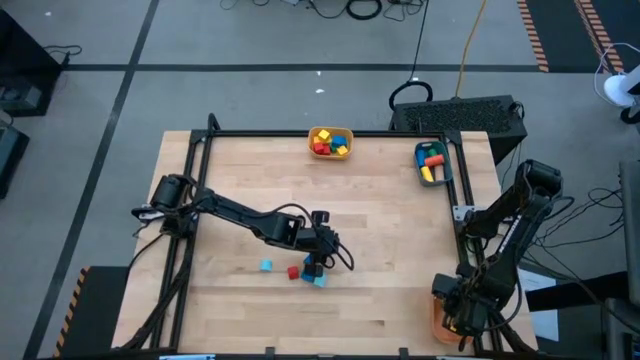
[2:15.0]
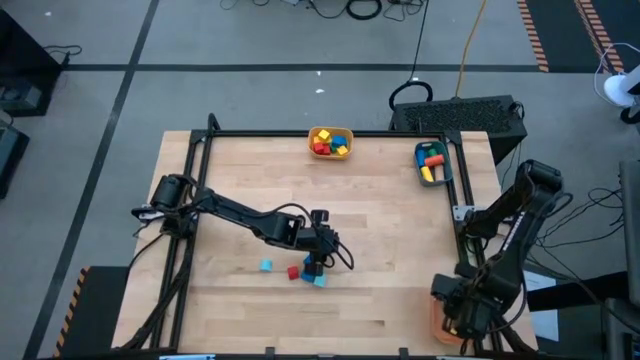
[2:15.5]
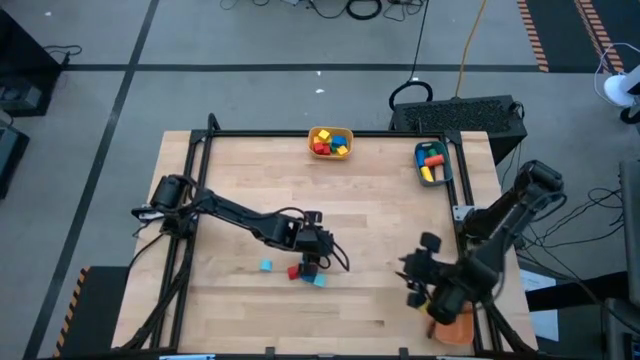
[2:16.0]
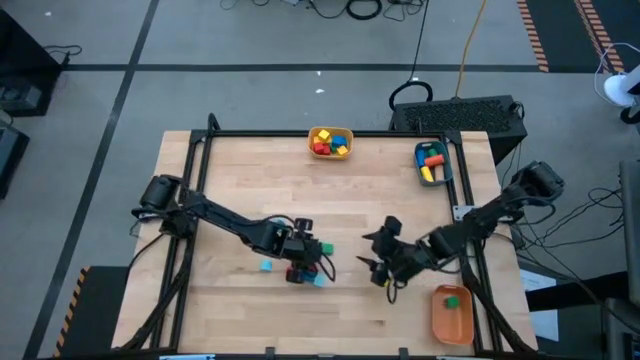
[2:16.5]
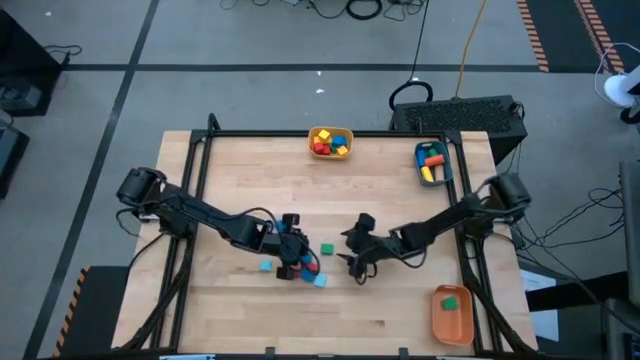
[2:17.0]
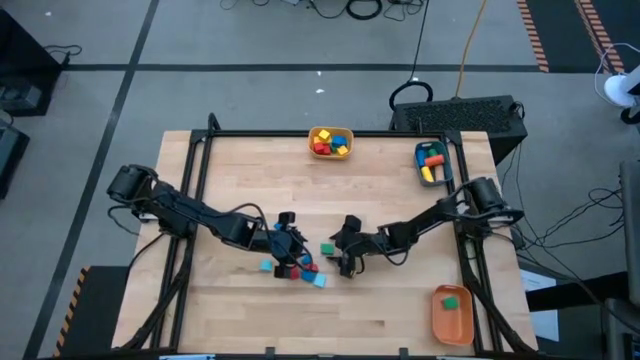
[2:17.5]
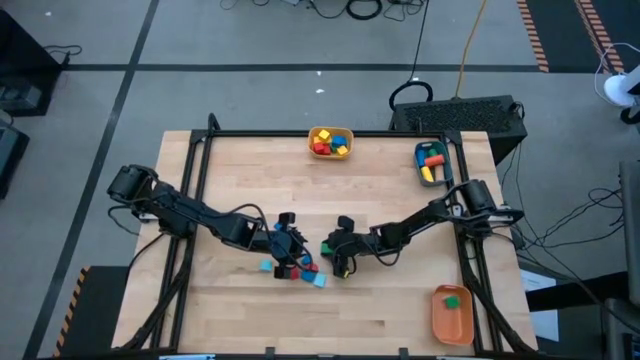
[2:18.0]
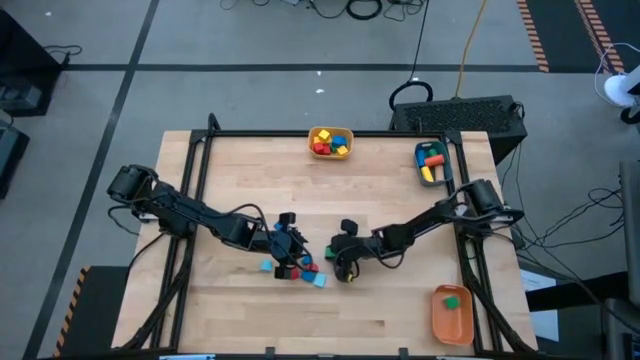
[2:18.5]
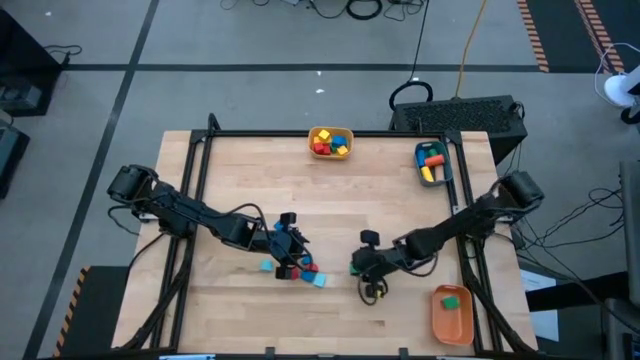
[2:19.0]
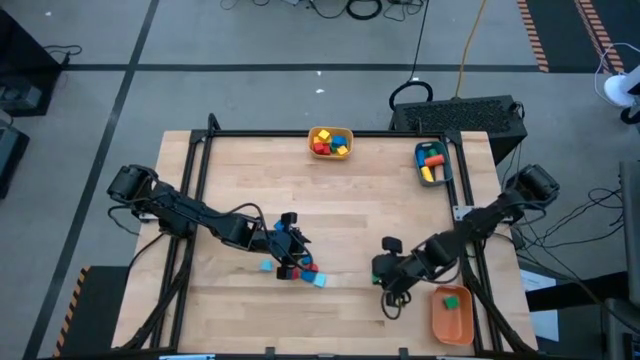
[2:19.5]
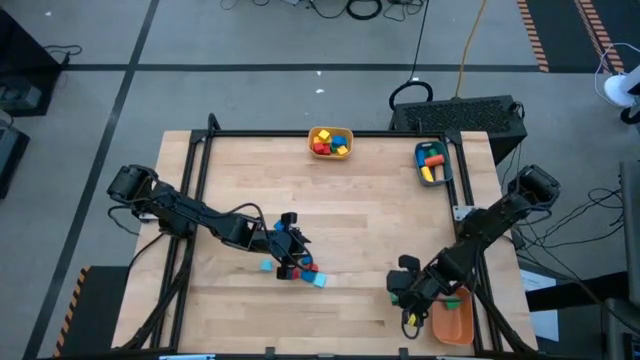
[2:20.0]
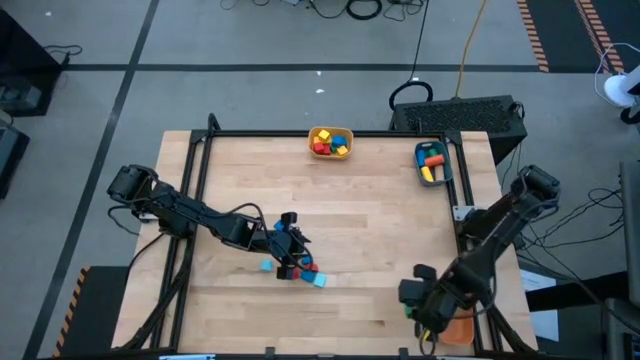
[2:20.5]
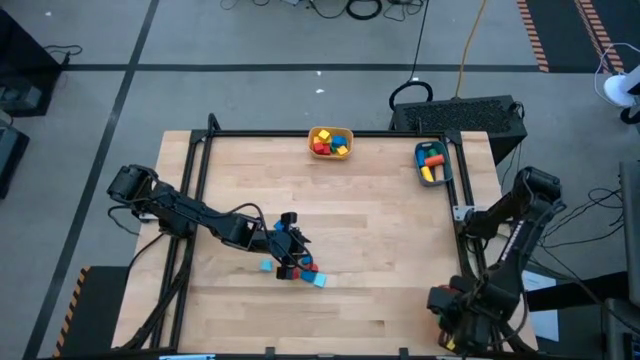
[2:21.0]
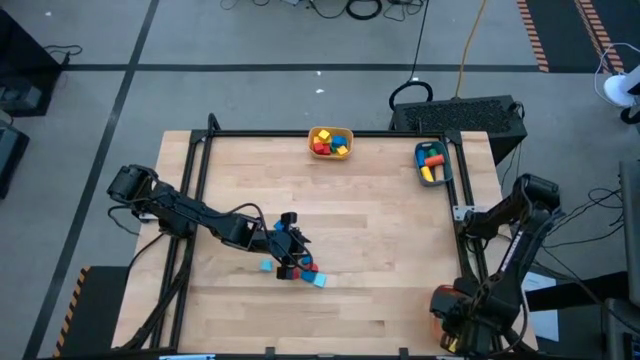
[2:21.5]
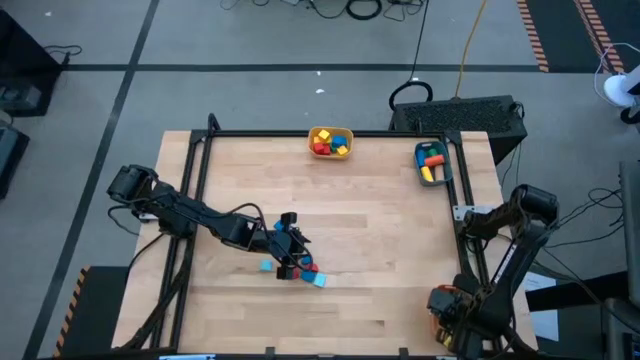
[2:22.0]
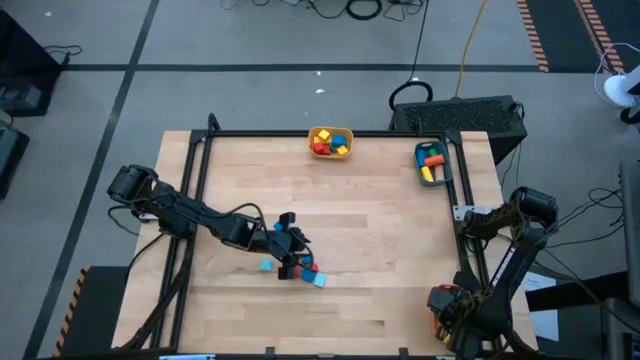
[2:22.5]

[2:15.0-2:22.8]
Task: Sort blocks by size
Put the green half circle block into the orange bin

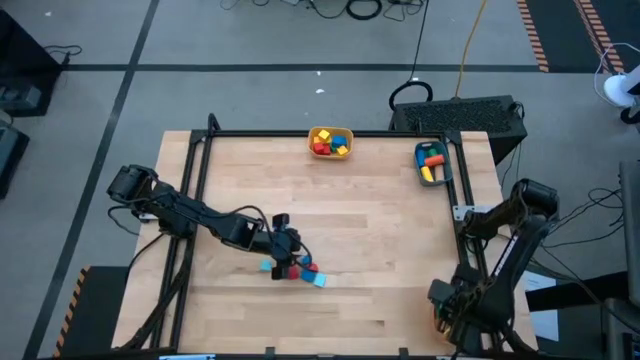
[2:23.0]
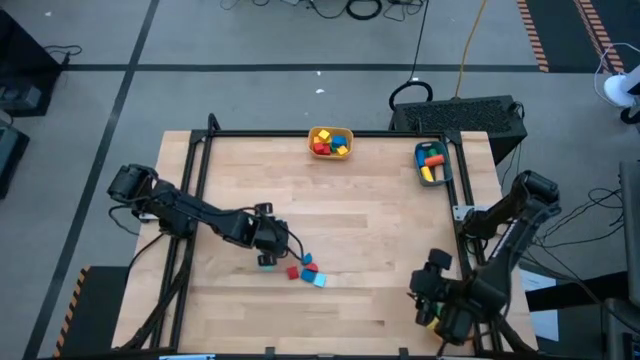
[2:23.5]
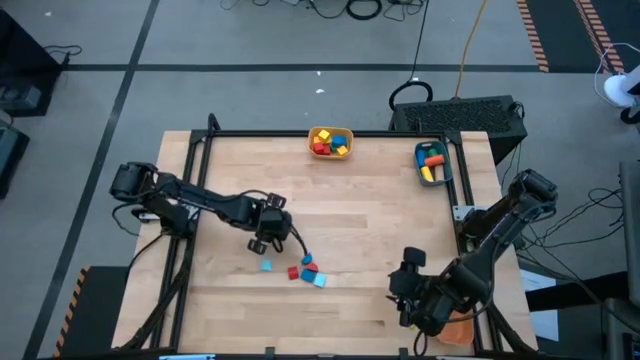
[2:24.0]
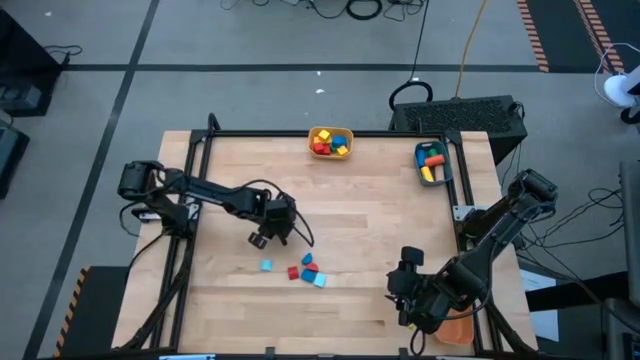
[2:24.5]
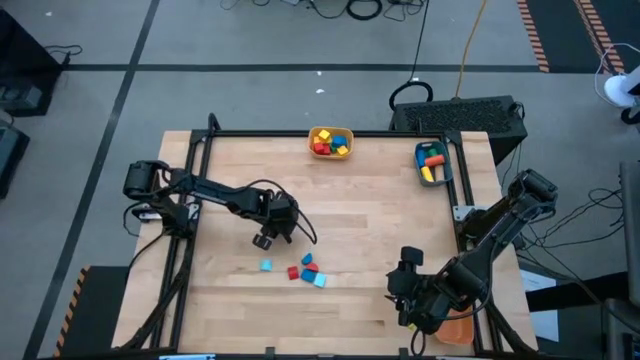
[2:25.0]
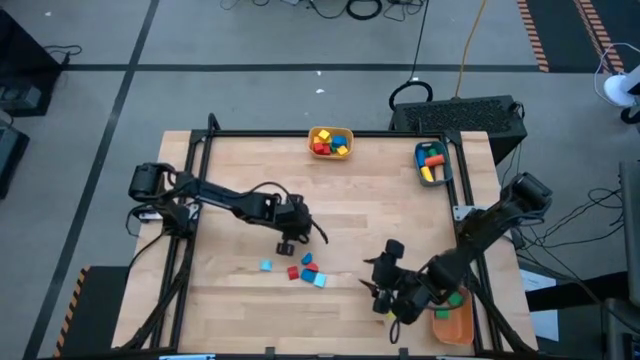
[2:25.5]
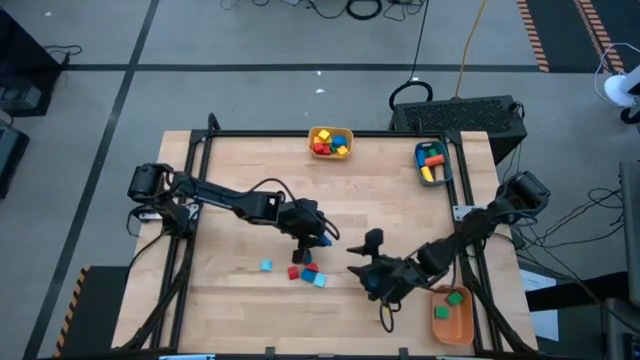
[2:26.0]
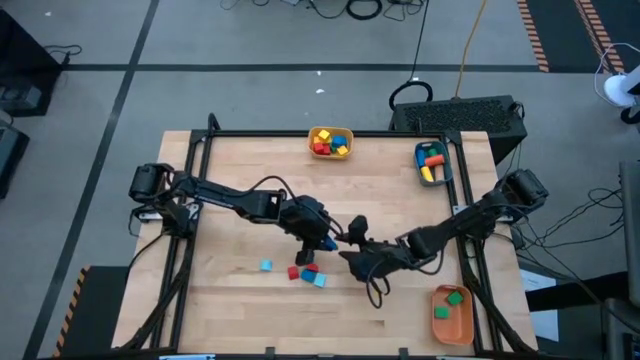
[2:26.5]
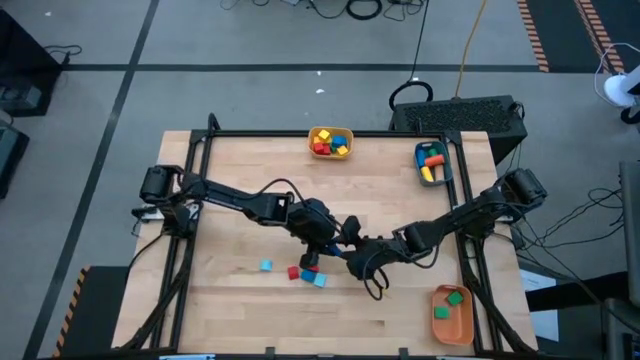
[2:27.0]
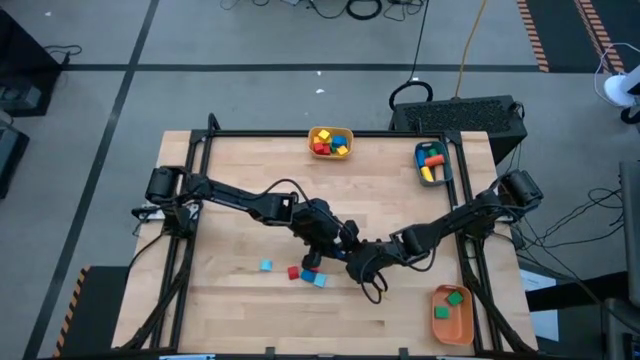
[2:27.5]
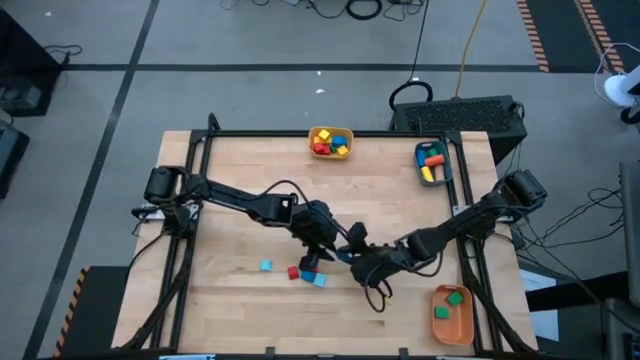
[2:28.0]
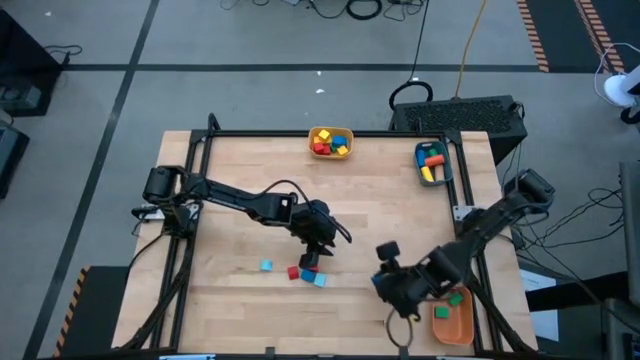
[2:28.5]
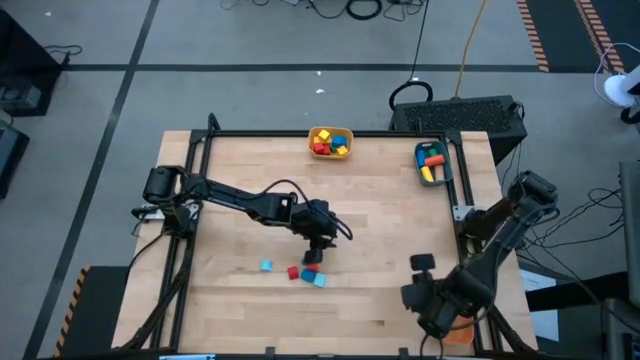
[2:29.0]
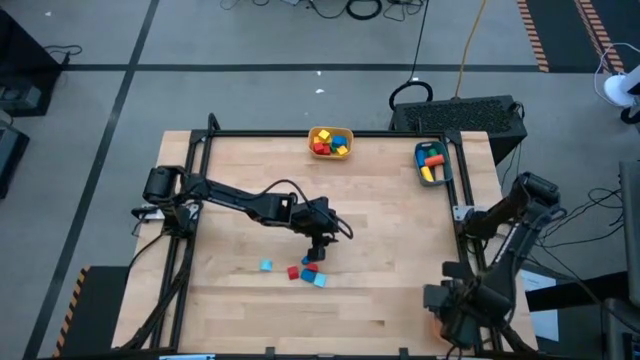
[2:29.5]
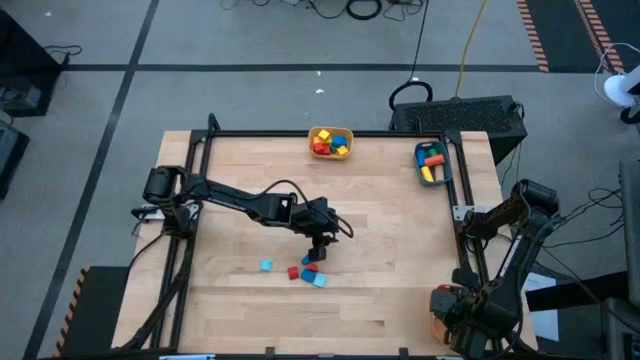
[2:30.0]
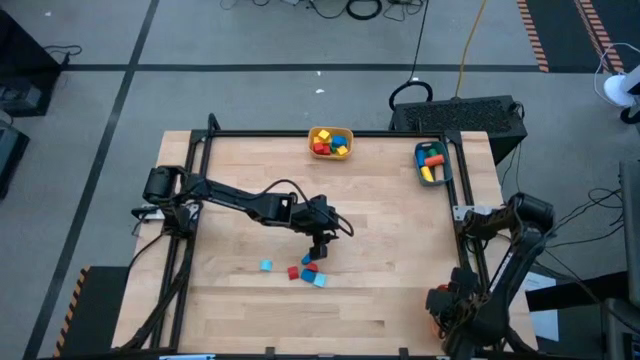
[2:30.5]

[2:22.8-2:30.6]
Put the blue half circle block into the orange bin

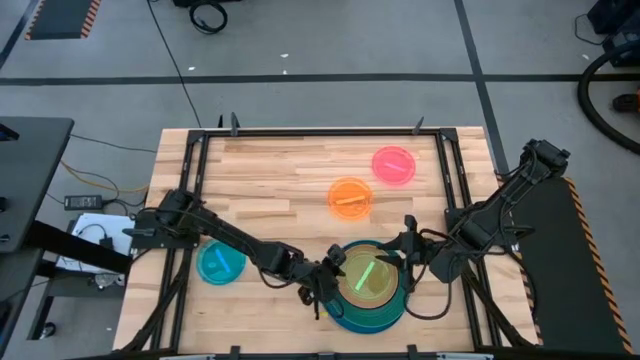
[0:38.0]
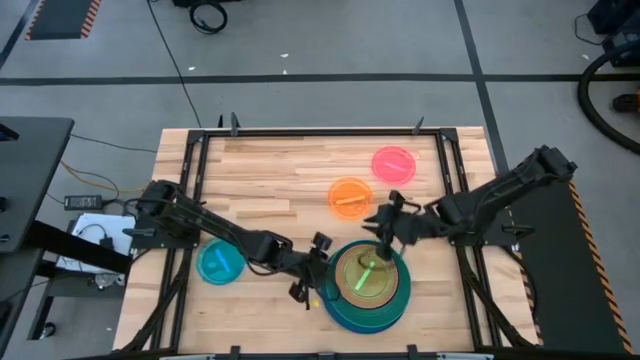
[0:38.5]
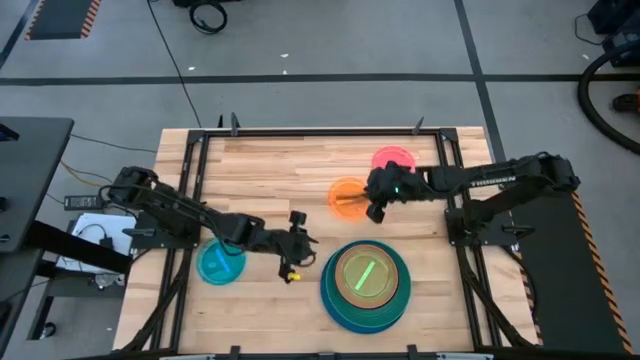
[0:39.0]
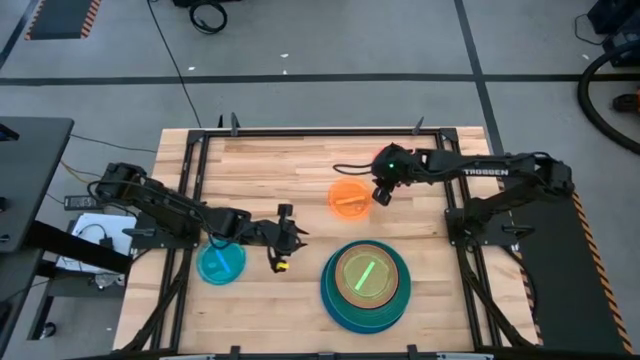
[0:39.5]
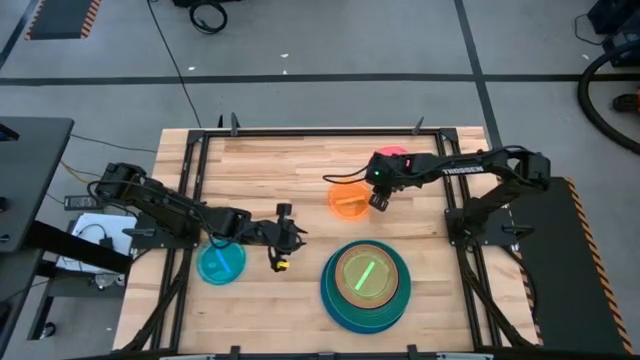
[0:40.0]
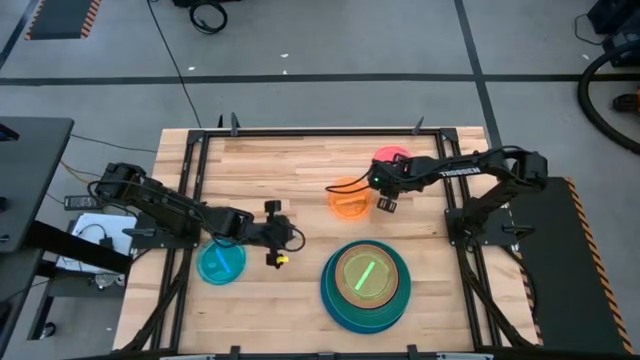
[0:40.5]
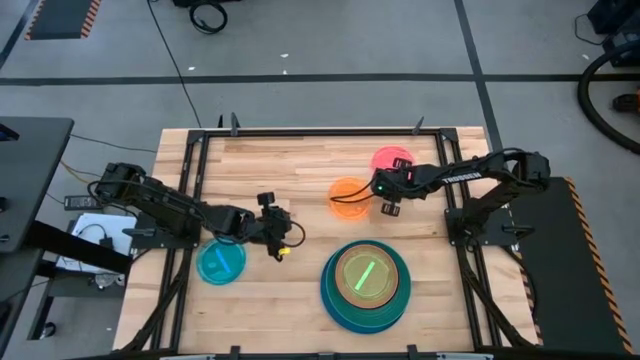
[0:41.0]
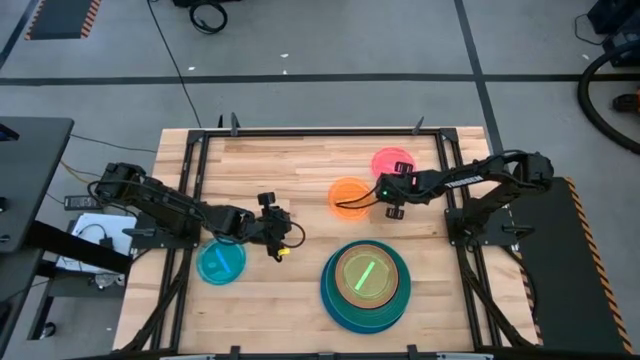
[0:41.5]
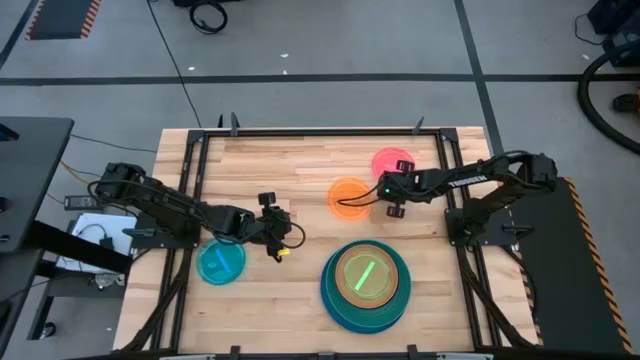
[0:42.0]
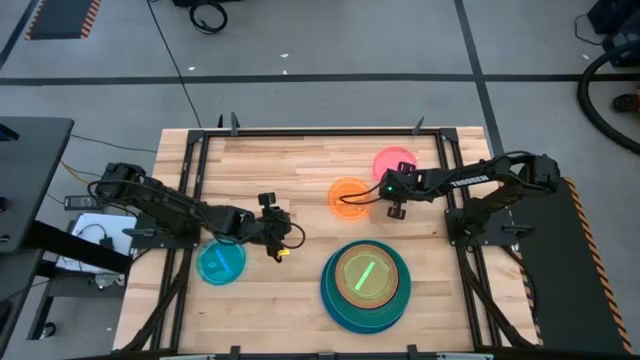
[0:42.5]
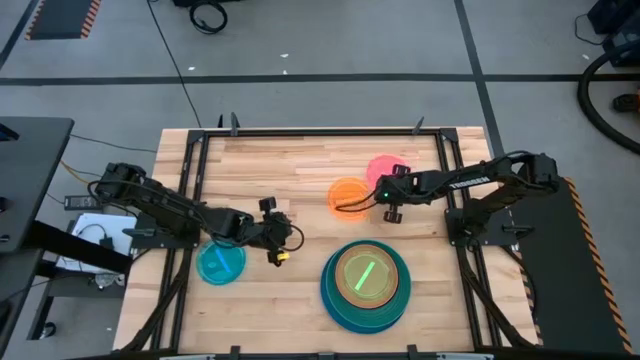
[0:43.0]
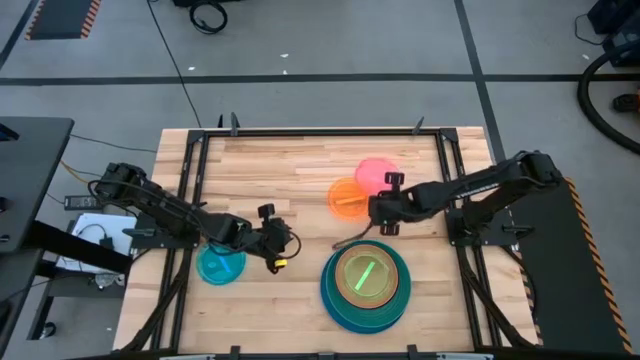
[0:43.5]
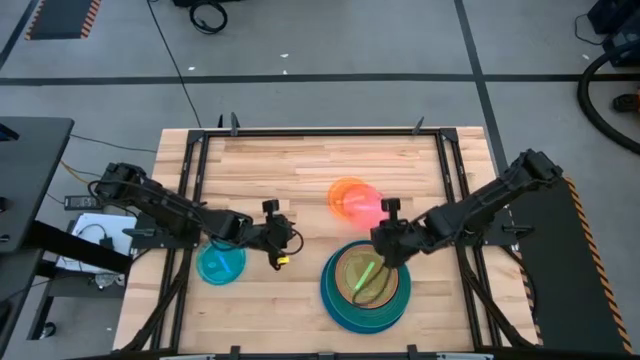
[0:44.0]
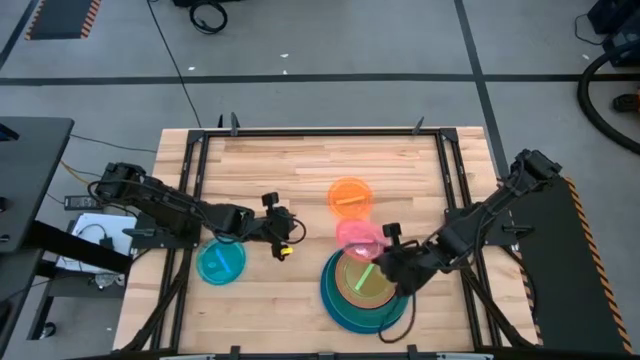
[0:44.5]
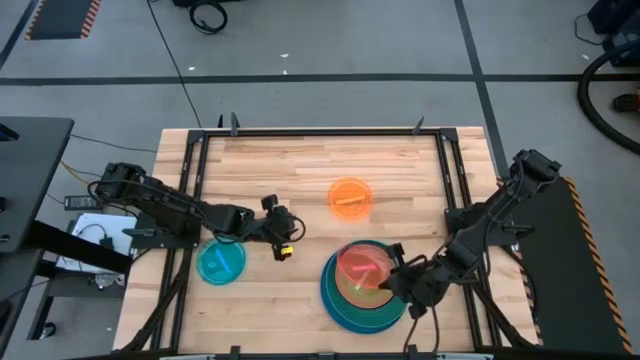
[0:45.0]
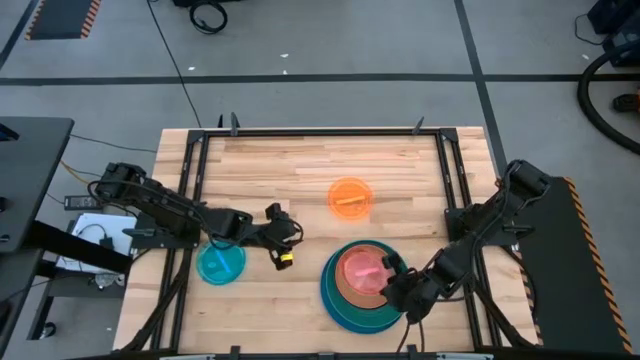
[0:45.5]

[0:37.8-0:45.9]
Task: Stack plastic plates
Stack the transparent pink plate on the top of the transparent green plate
